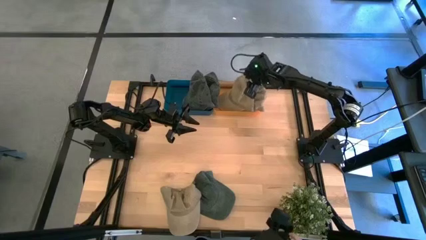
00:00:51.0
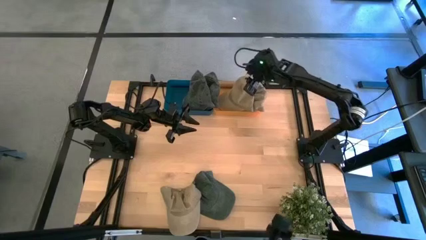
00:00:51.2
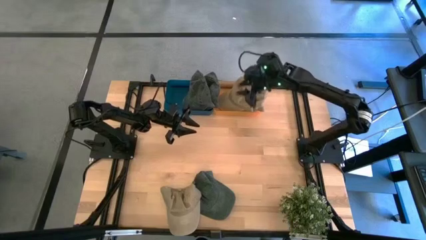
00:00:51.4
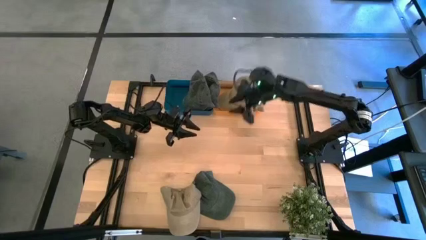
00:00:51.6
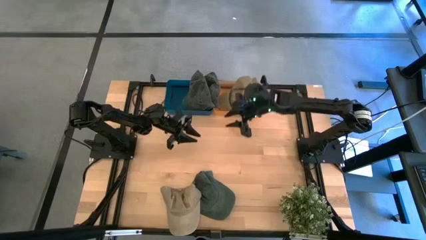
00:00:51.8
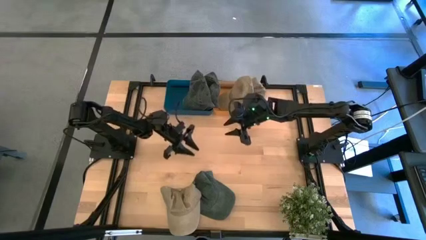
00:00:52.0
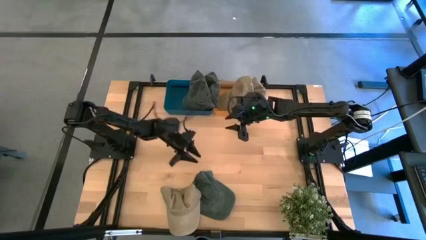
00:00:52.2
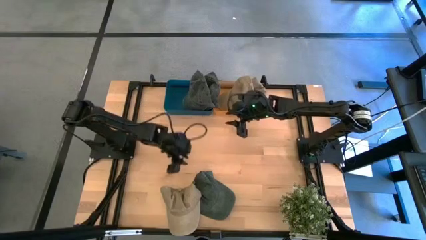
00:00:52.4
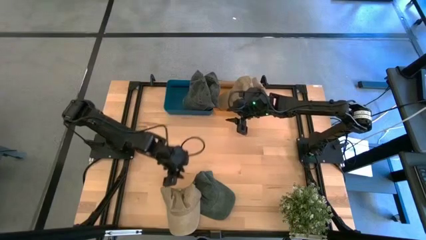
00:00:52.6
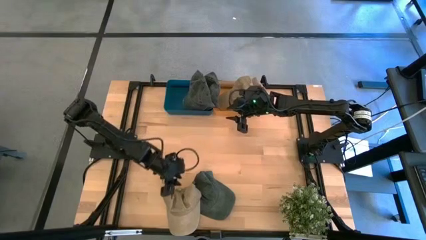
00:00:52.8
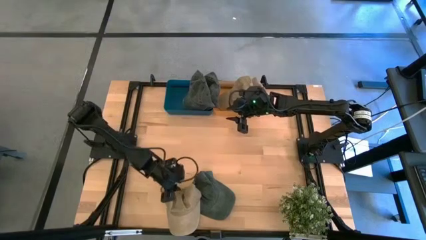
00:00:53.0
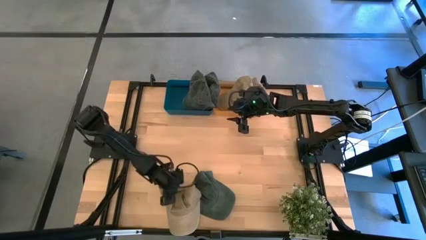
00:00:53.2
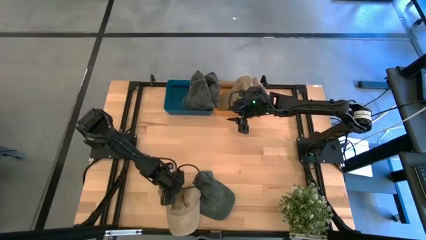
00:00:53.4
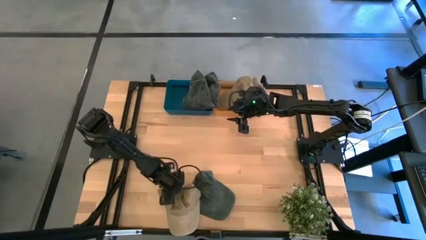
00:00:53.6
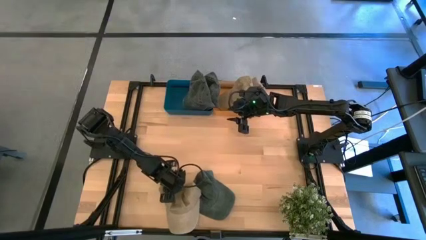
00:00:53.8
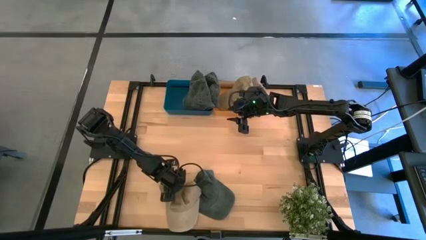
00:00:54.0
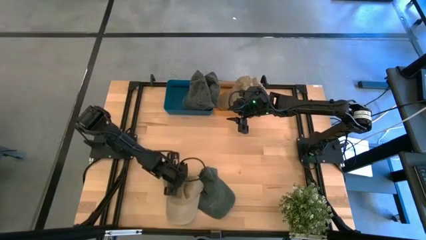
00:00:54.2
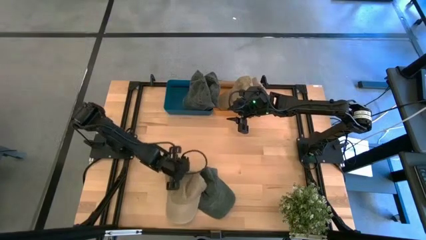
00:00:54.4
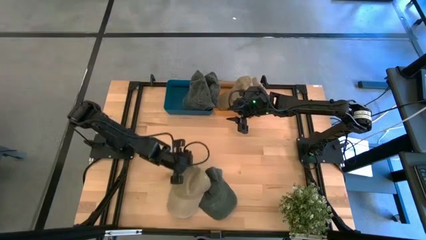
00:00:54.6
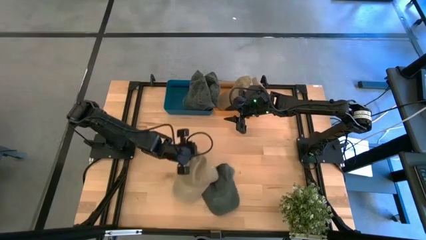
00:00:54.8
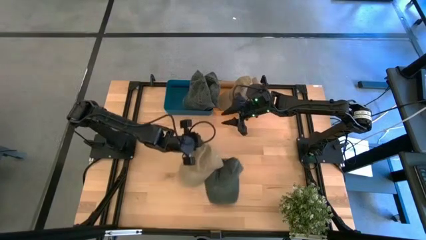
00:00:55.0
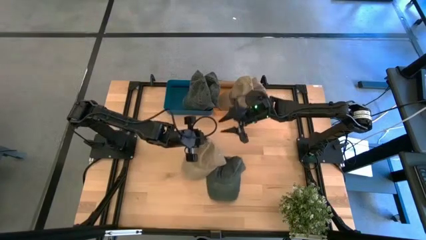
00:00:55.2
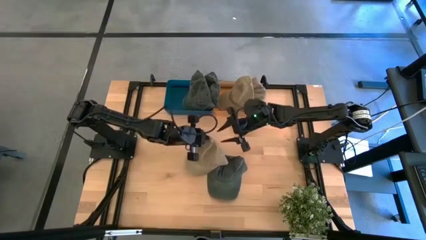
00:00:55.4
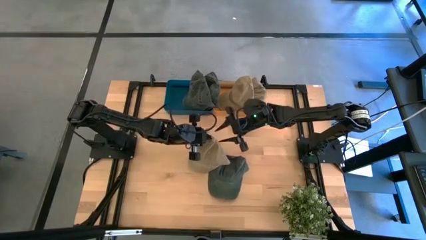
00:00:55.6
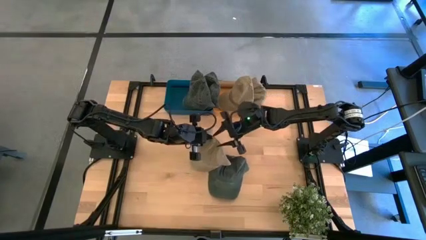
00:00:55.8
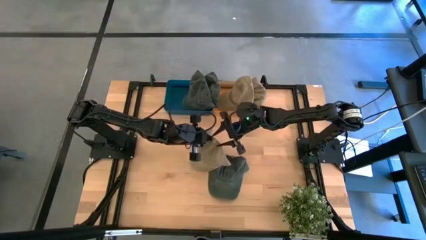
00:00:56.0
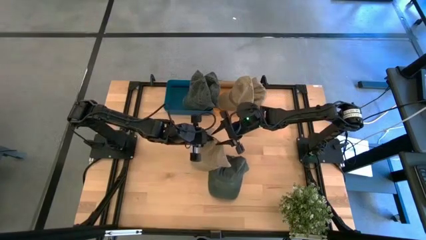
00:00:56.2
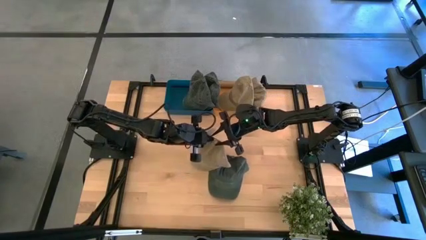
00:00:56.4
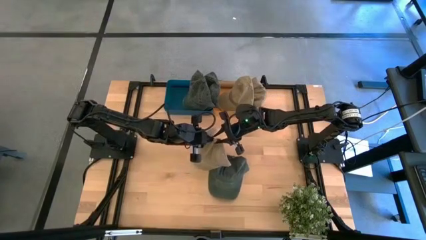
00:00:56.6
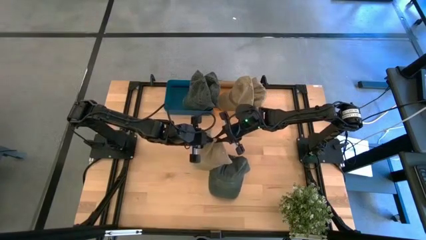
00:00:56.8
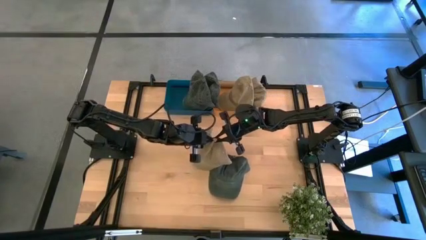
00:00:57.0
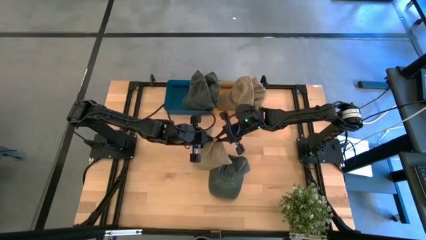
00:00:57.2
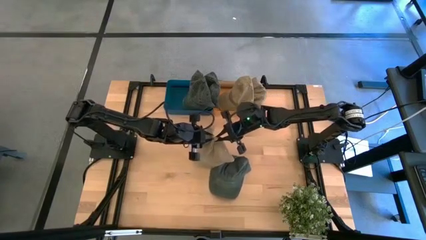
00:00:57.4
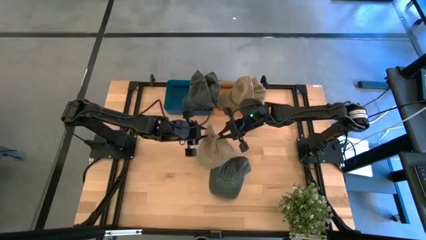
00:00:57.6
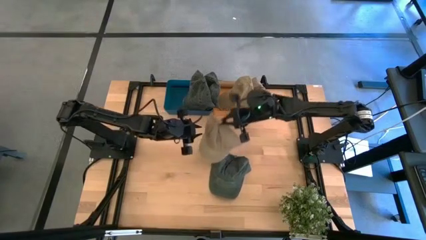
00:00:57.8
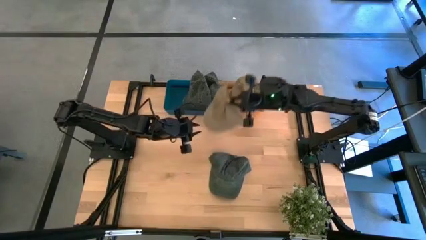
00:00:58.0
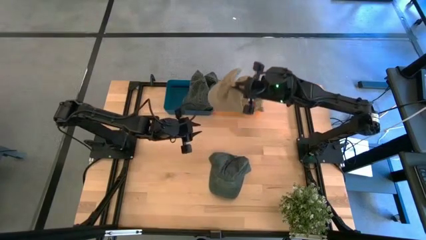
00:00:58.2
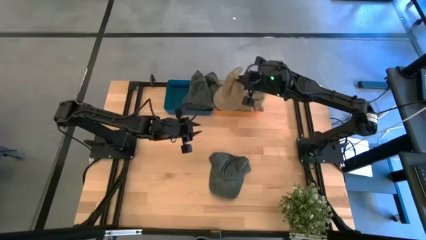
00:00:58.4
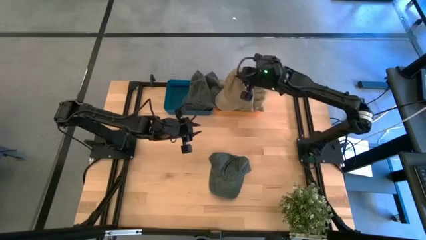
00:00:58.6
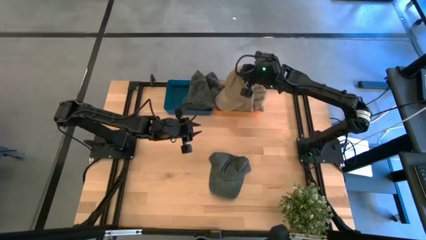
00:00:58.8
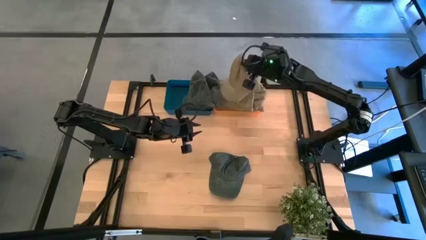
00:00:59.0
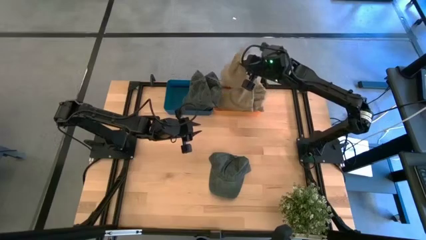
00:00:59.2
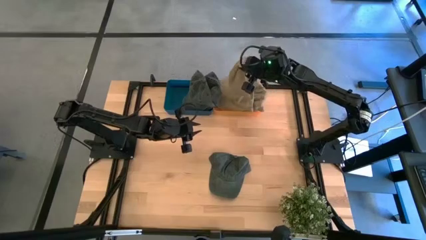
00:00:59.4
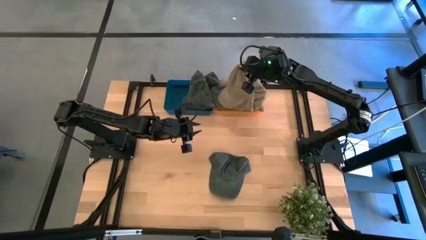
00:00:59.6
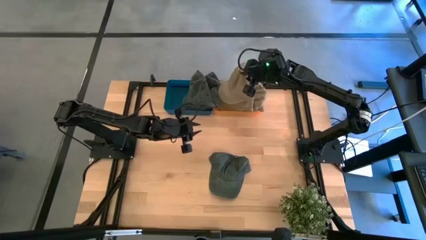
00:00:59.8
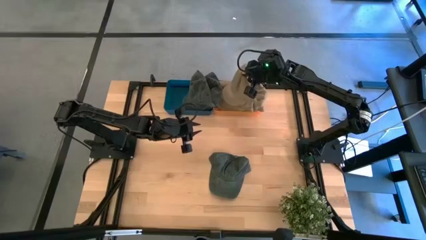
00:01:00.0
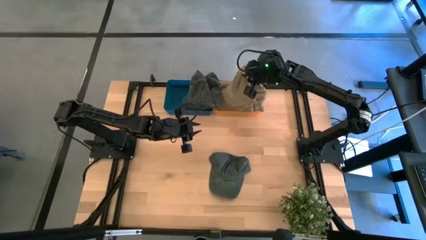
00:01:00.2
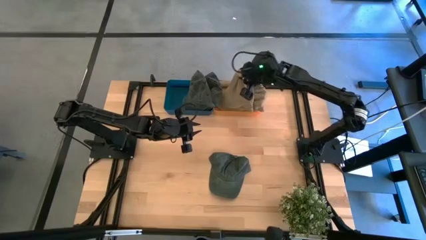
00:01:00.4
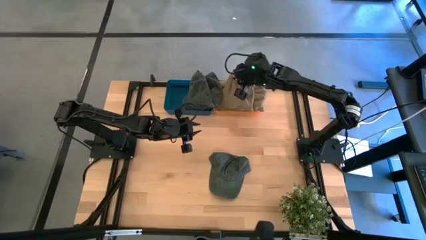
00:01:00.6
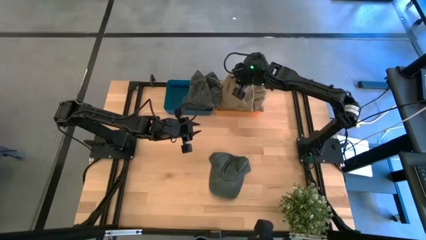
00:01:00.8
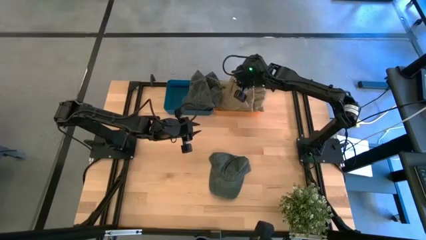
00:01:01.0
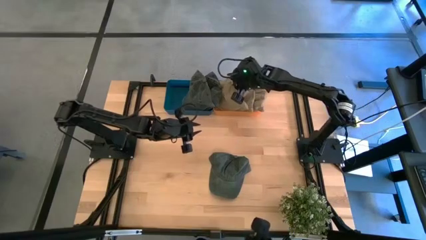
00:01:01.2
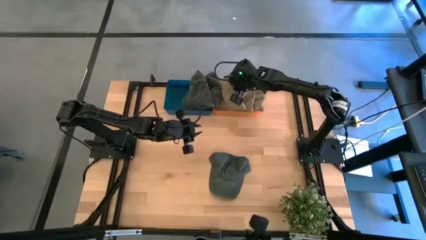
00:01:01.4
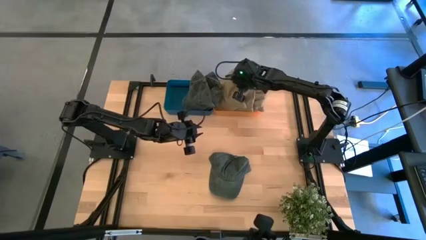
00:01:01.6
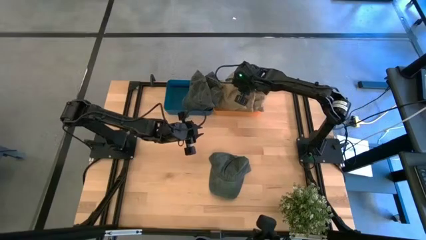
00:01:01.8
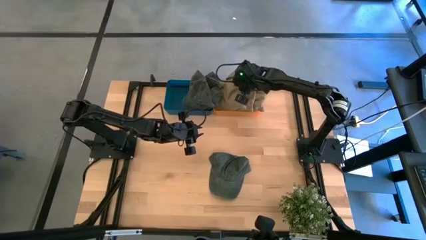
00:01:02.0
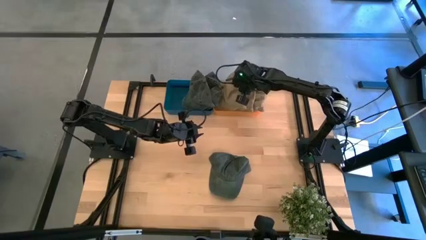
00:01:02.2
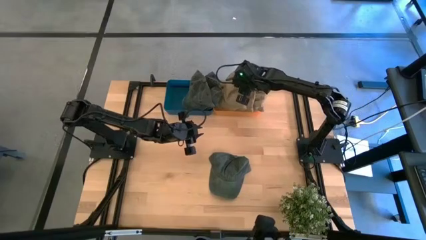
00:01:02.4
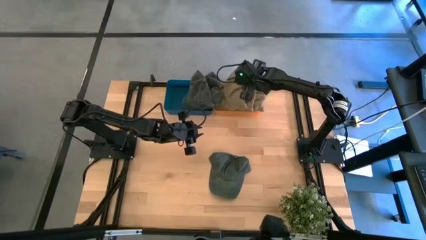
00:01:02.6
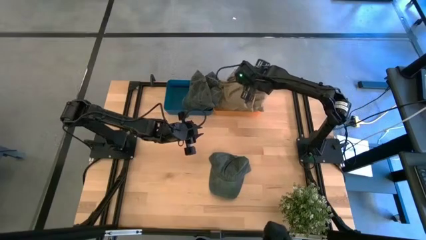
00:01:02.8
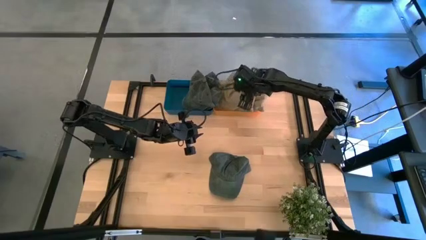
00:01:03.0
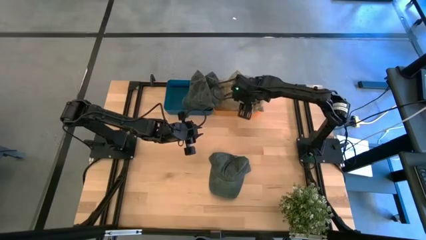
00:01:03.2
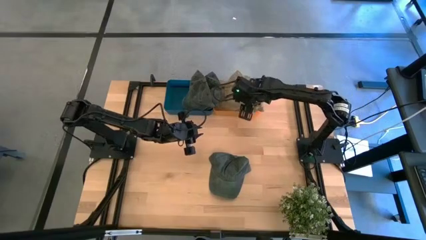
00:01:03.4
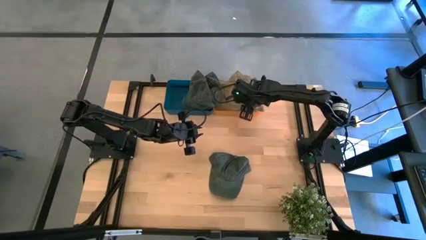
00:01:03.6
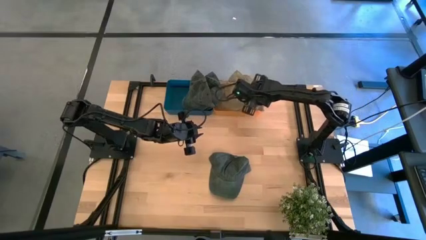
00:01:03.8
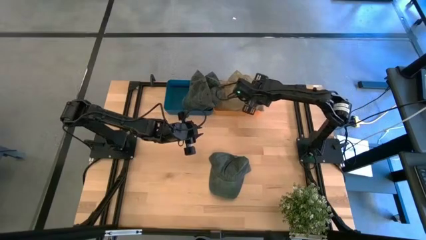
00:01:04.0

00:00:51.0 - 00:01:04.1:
Task: Pick & Place hat
Put the brown cap into the orange bin
